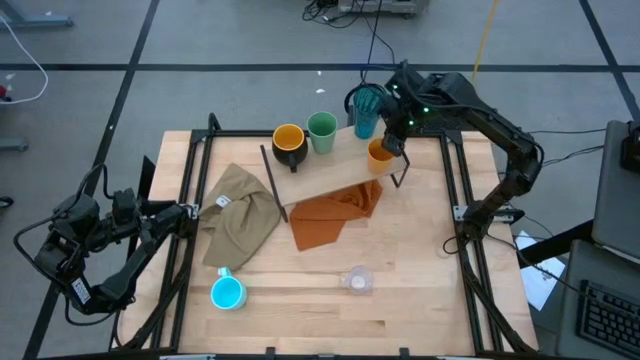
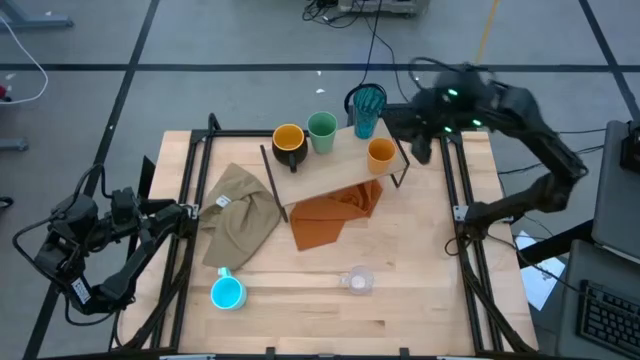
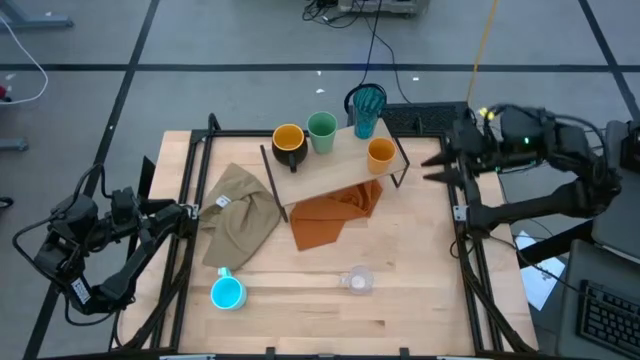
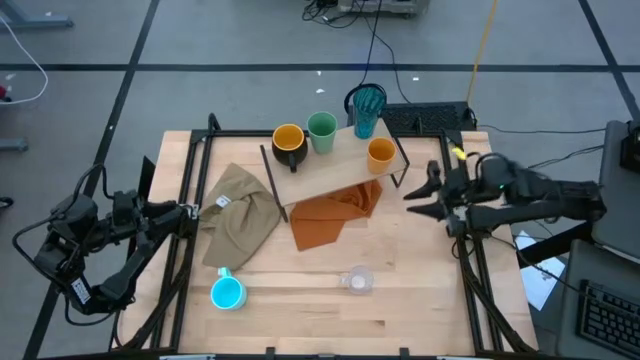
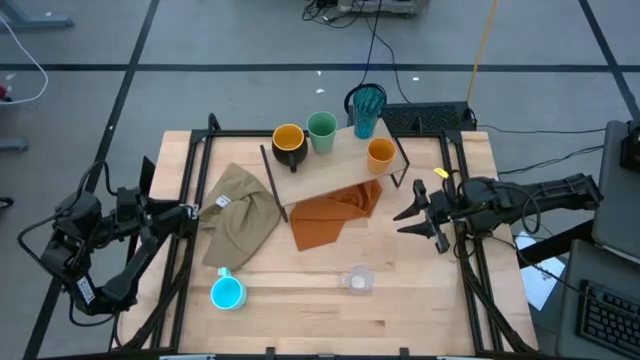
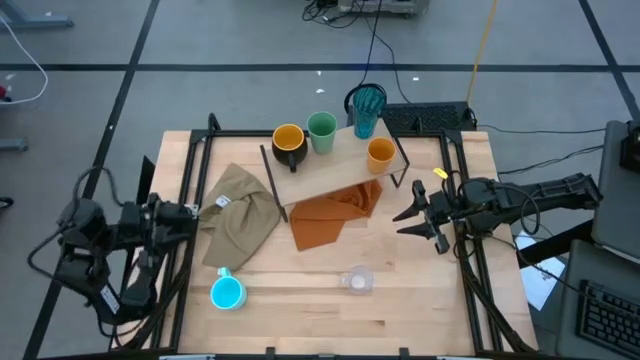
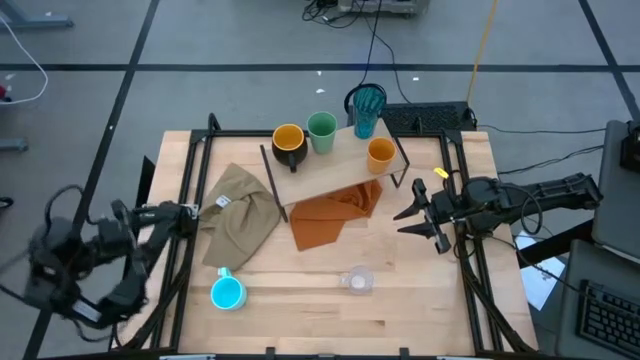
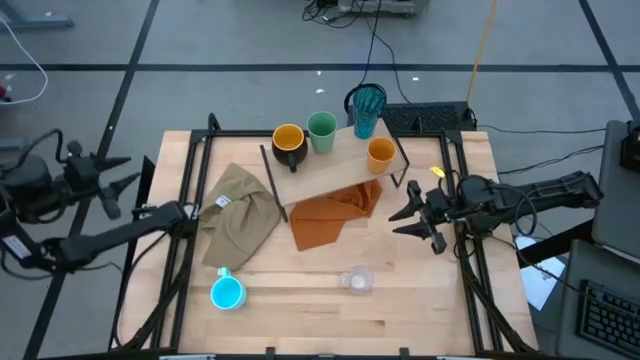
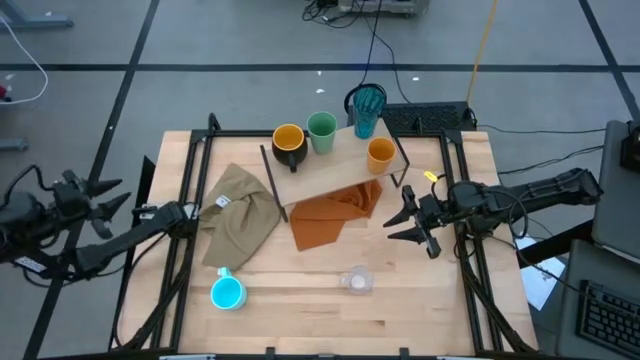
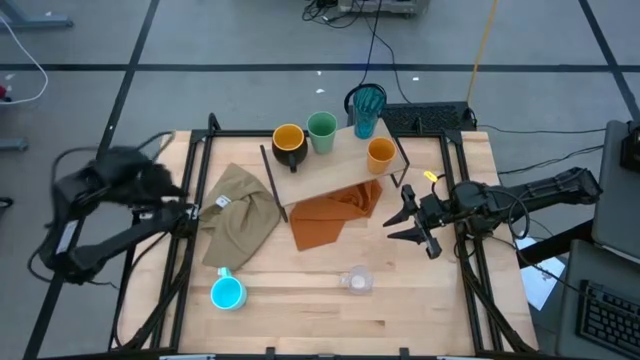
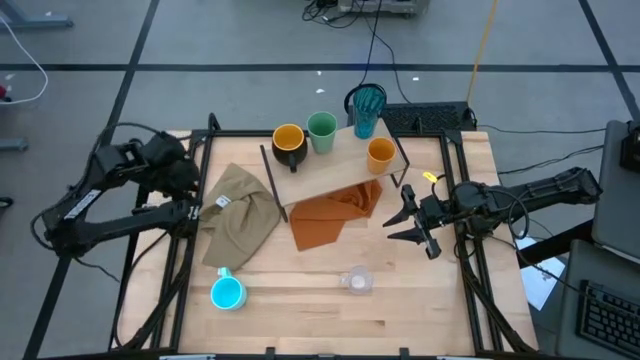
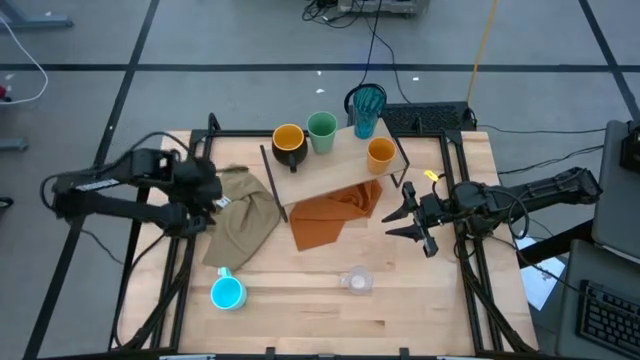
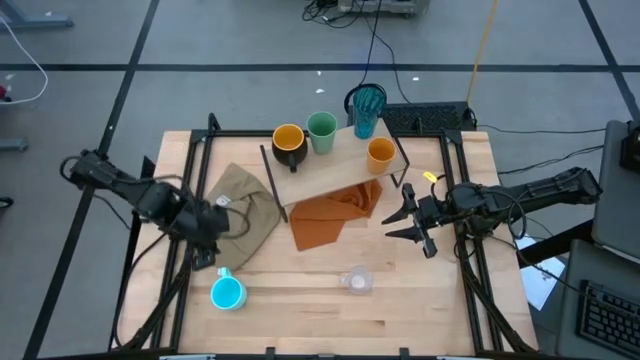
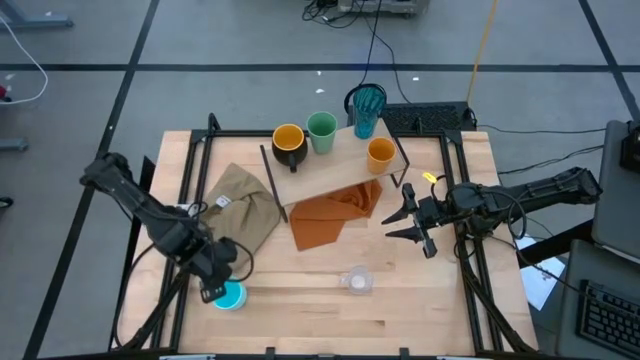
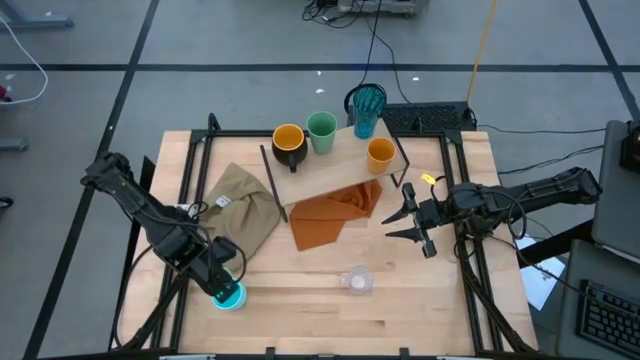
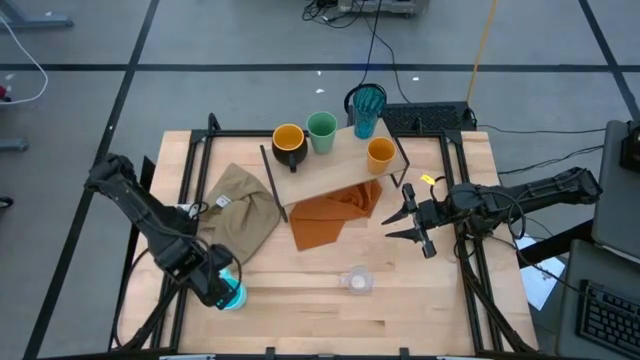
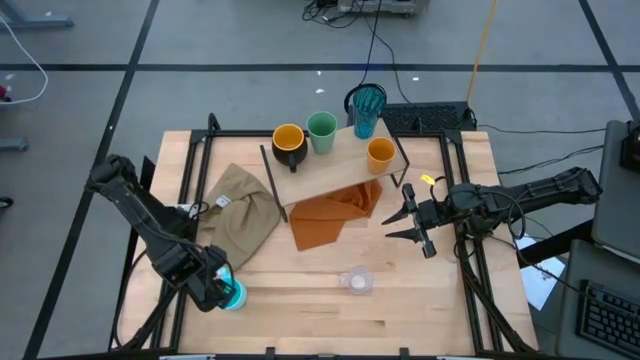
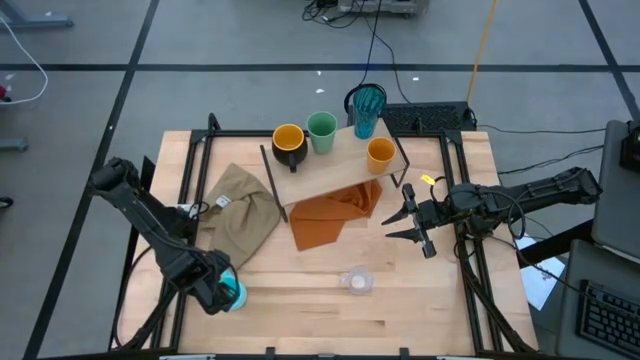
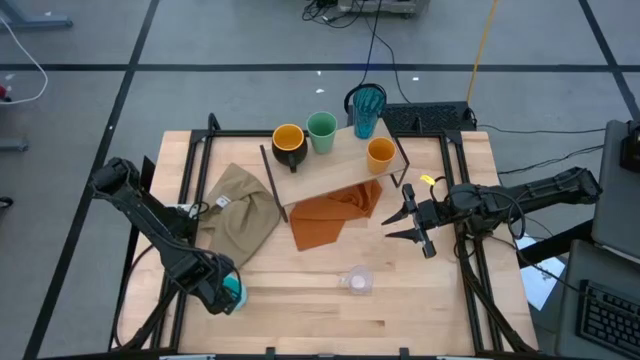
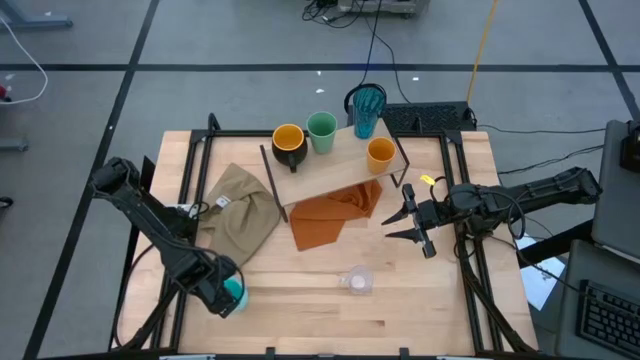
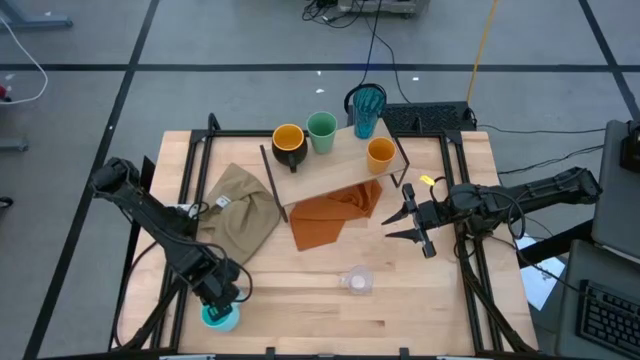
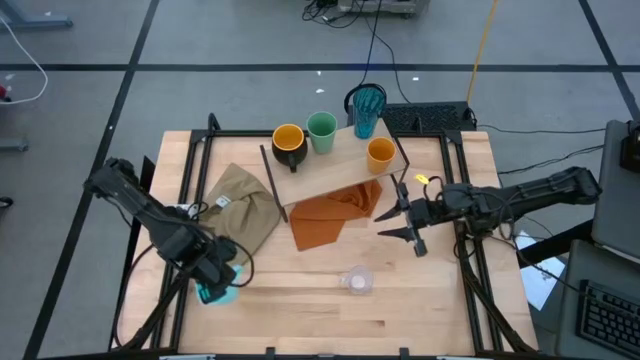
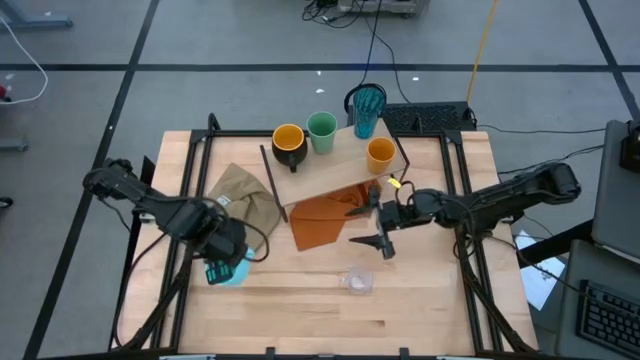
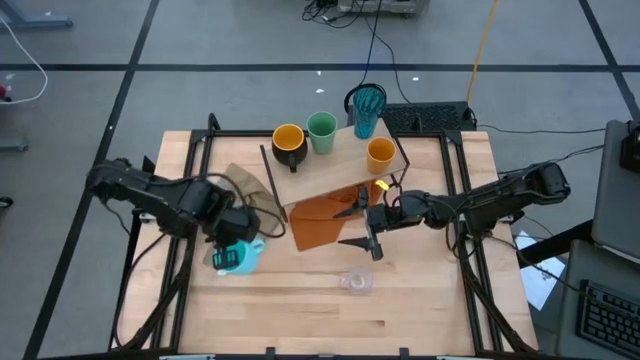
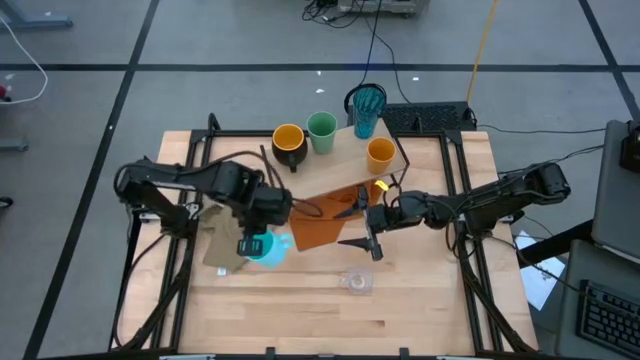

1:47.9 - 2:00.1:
Task: Stack small to large cups/mugs on shelf
Put the blue mug on the shelf

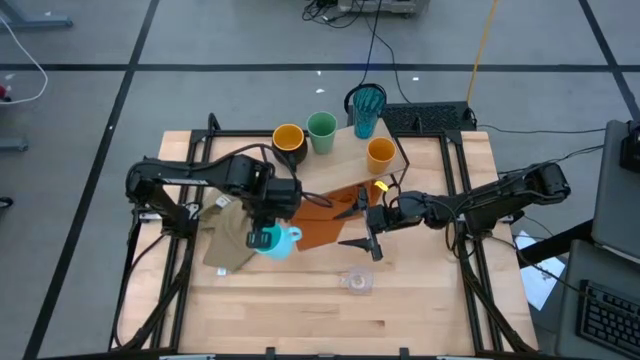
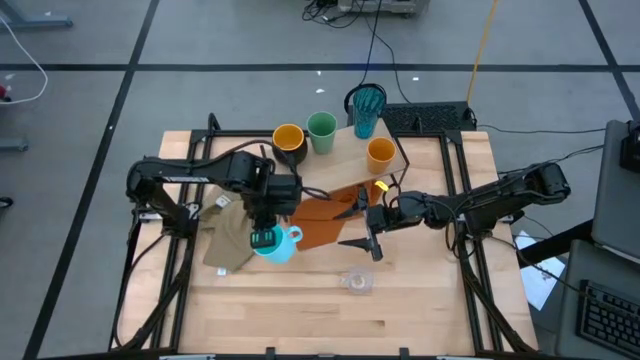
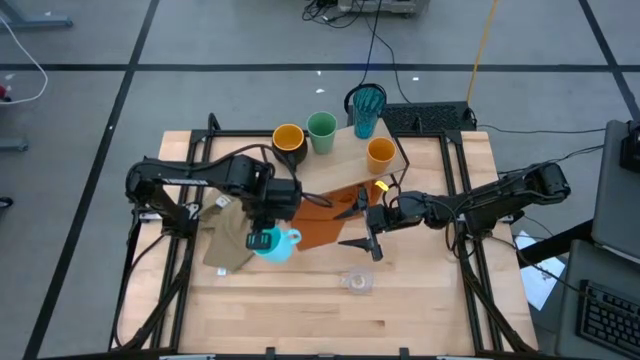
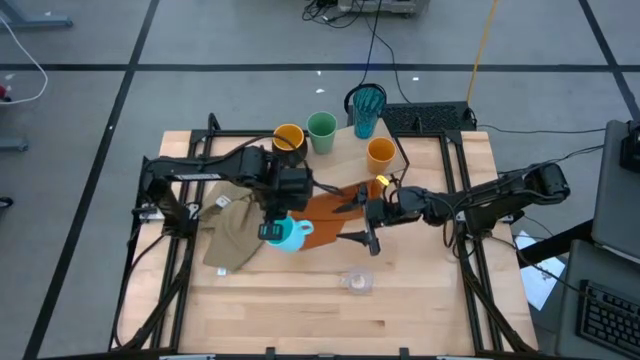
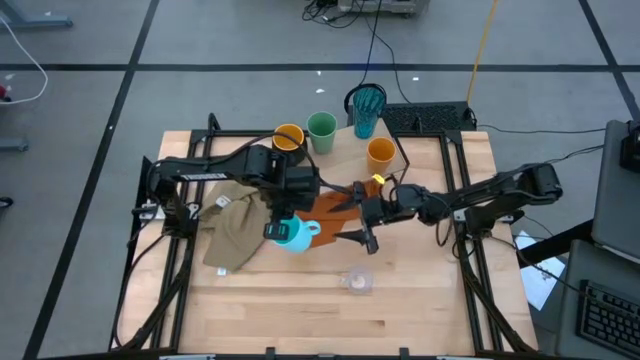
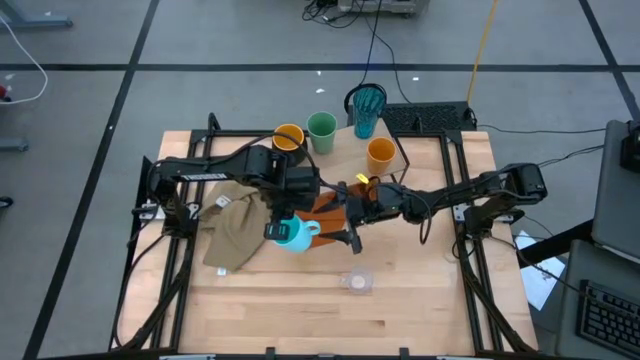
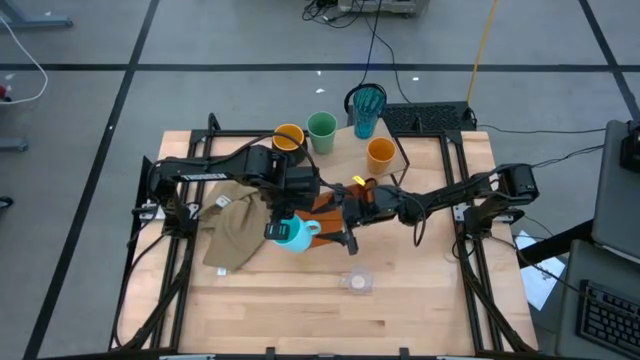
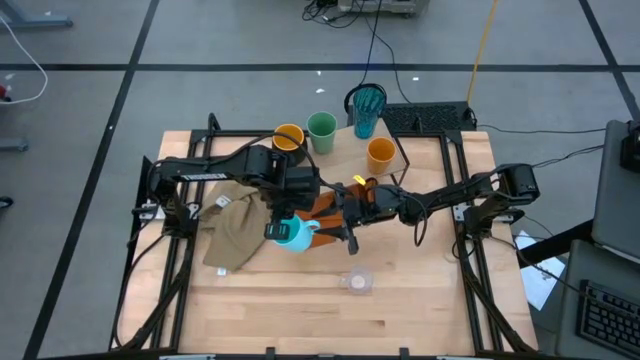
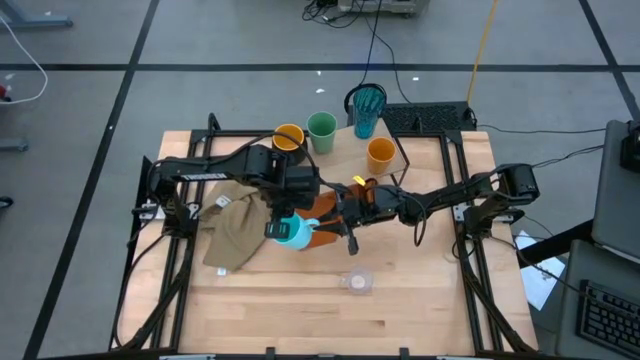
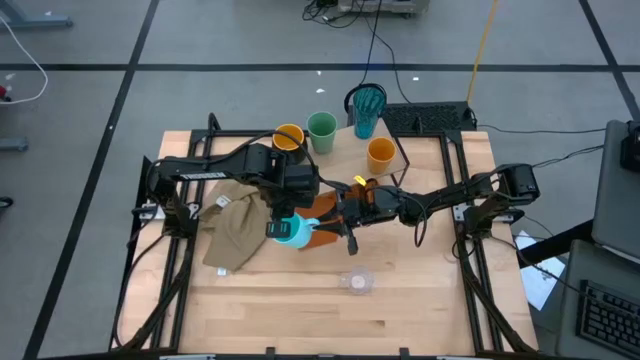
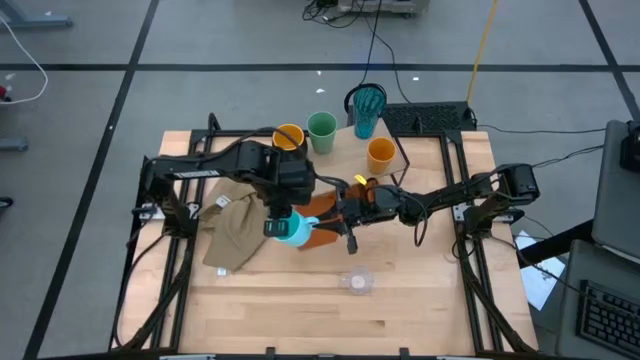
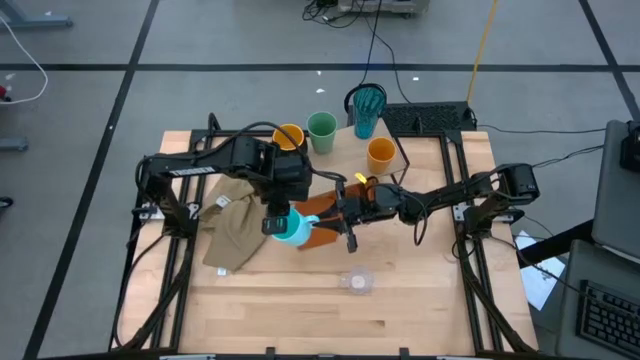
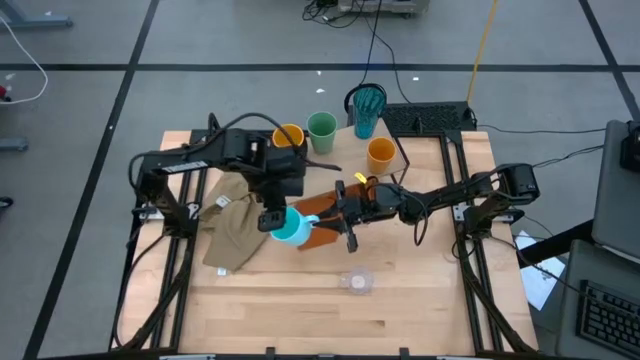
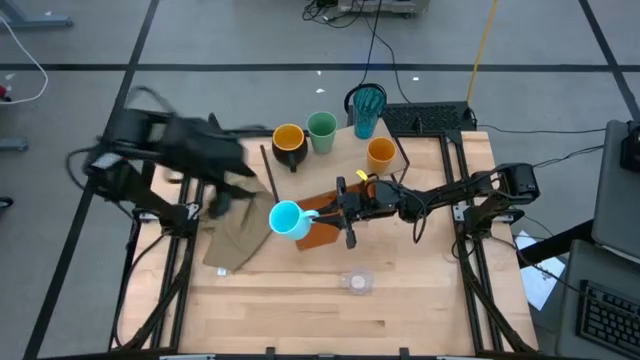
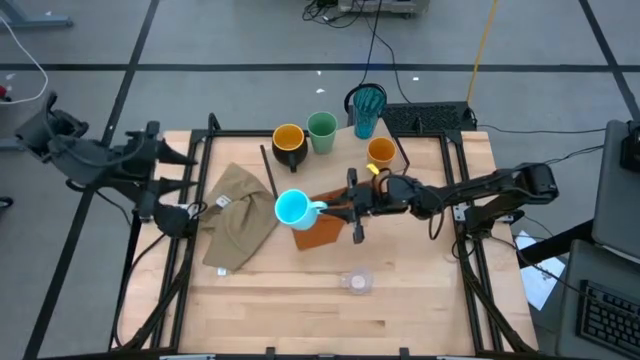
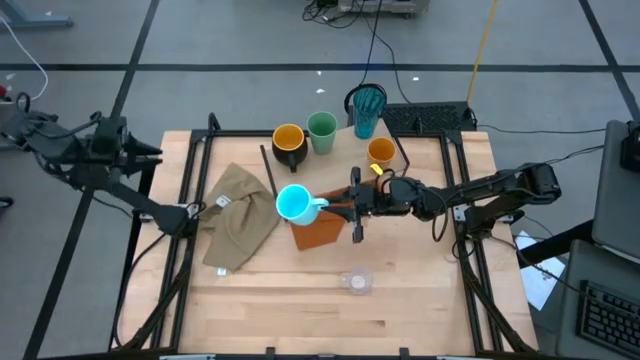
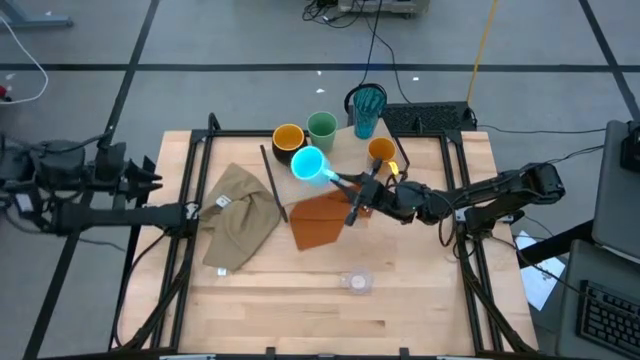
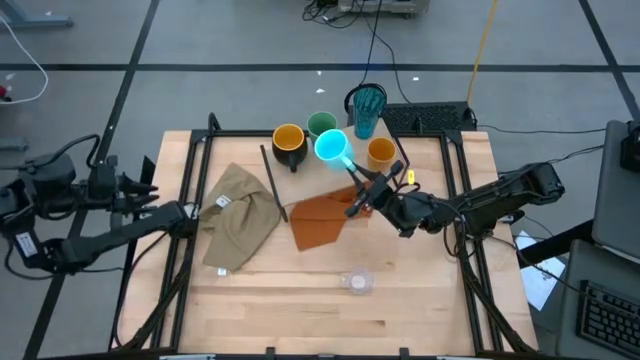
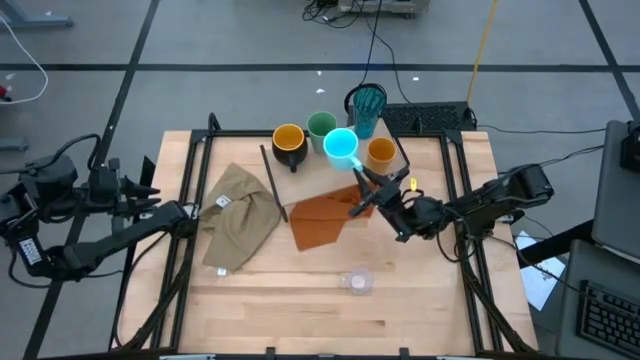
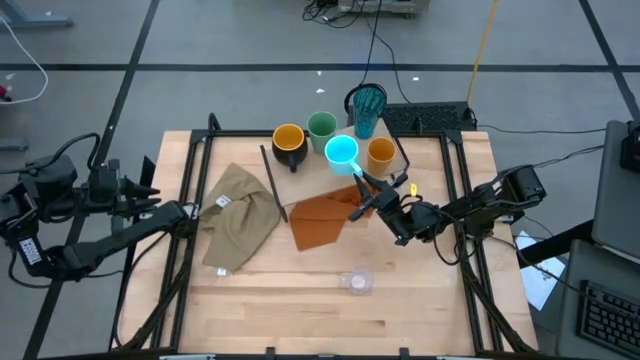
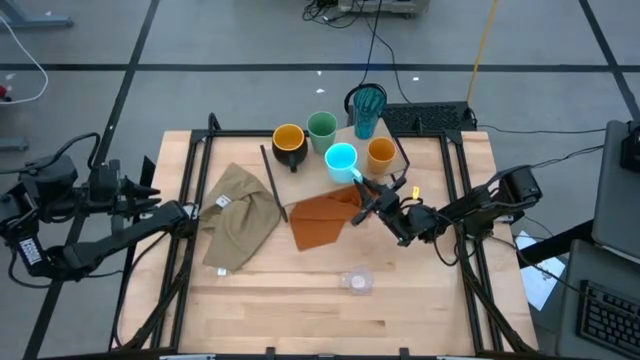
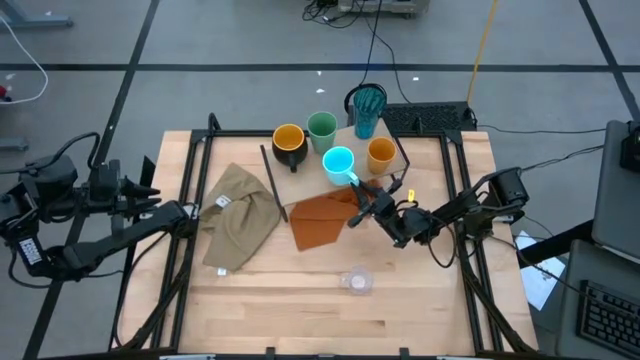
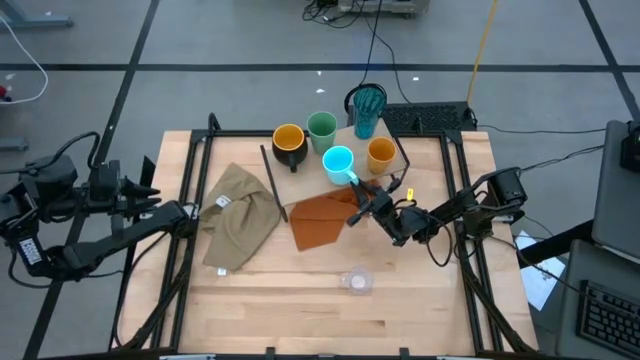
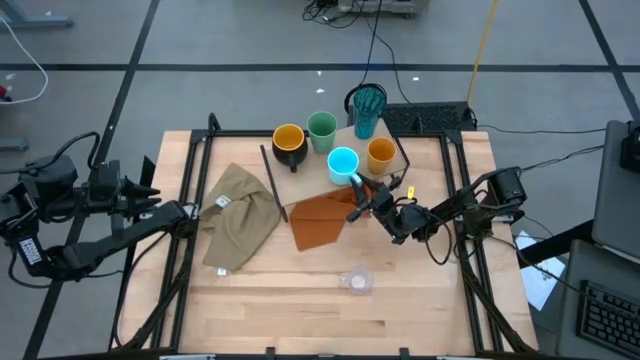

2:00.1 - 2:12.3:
Put the blue mug on the shelf
